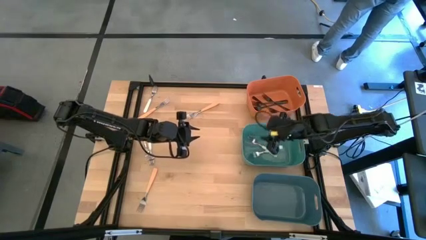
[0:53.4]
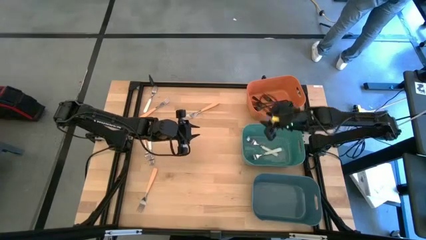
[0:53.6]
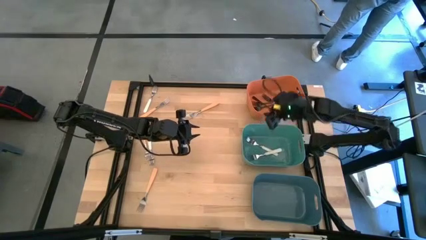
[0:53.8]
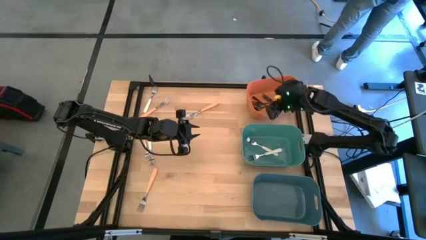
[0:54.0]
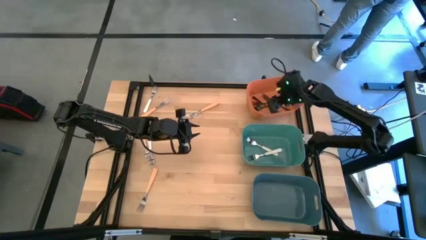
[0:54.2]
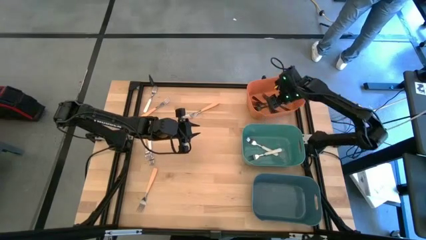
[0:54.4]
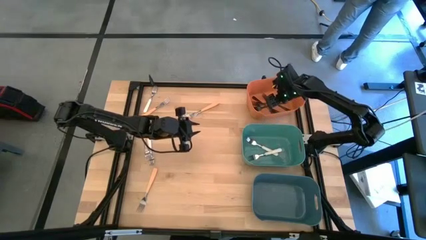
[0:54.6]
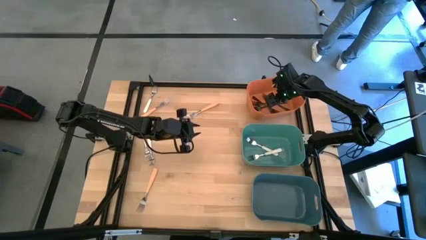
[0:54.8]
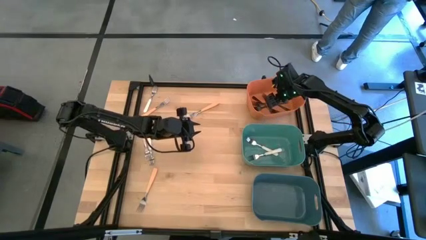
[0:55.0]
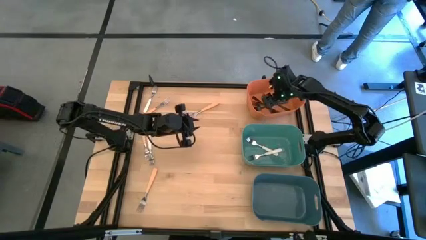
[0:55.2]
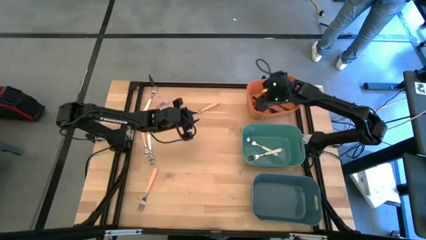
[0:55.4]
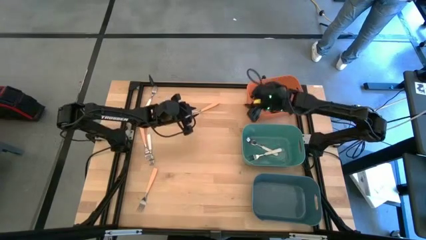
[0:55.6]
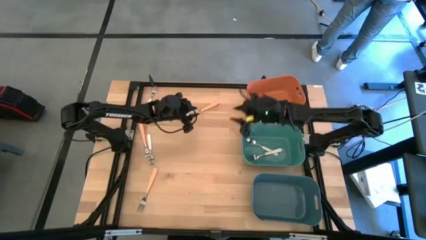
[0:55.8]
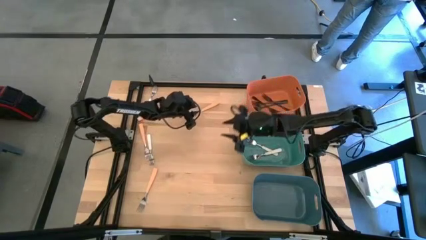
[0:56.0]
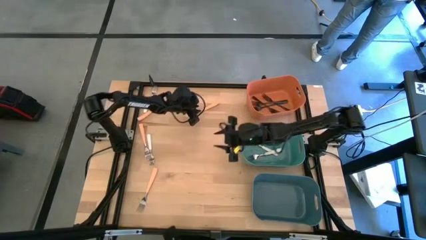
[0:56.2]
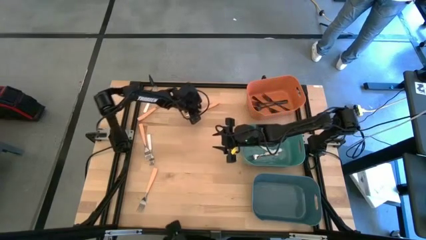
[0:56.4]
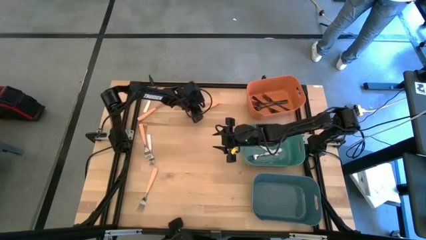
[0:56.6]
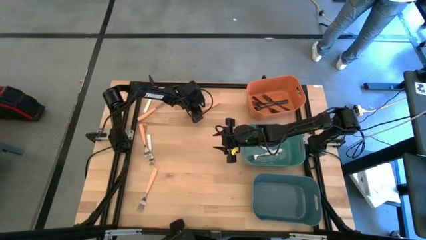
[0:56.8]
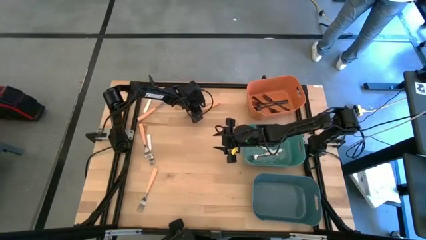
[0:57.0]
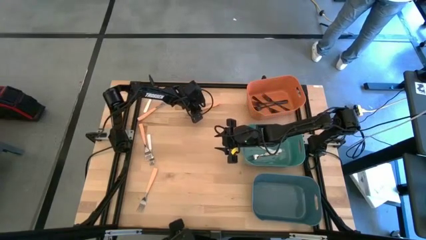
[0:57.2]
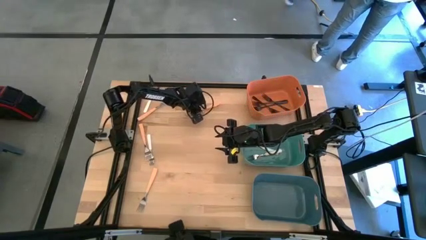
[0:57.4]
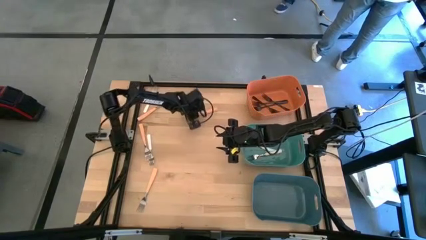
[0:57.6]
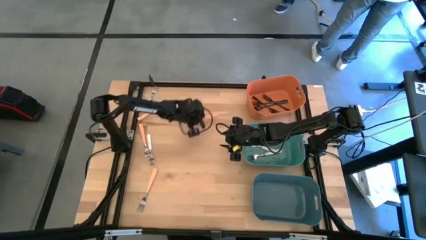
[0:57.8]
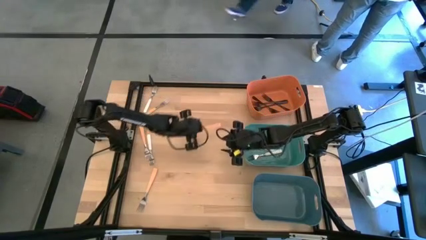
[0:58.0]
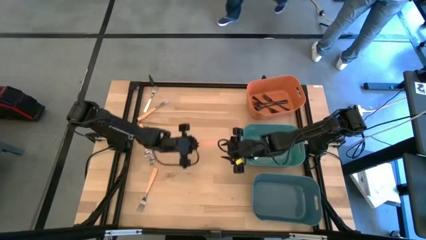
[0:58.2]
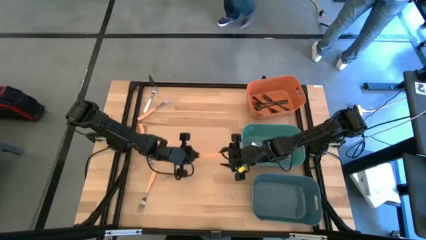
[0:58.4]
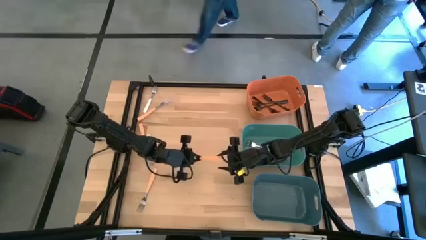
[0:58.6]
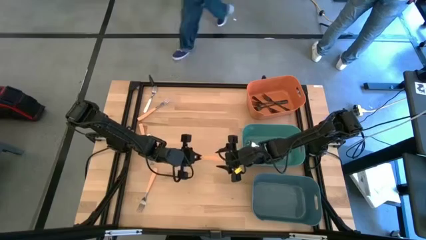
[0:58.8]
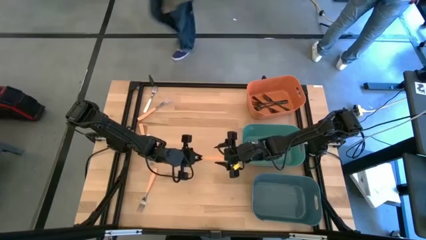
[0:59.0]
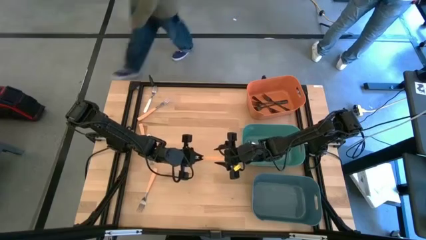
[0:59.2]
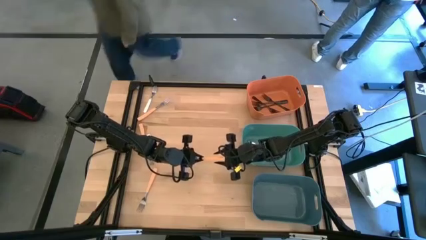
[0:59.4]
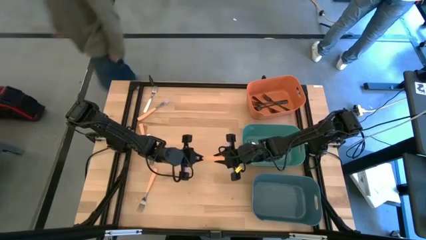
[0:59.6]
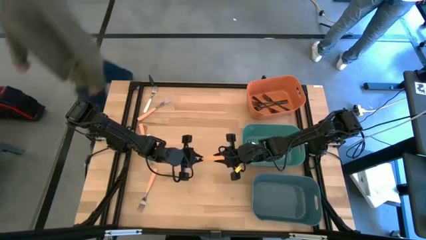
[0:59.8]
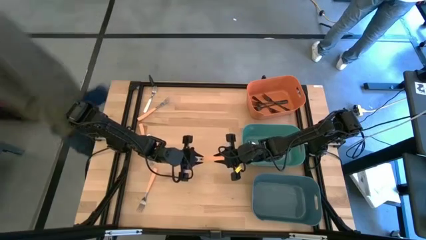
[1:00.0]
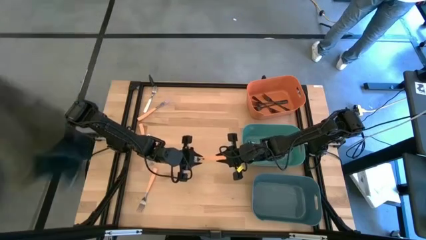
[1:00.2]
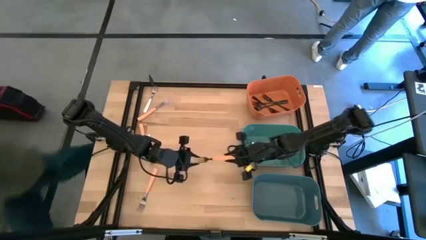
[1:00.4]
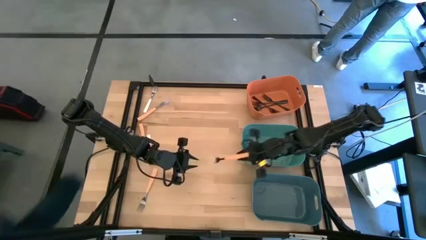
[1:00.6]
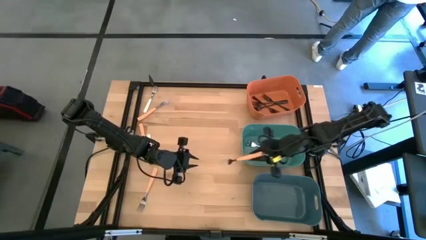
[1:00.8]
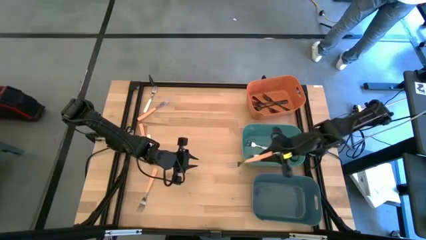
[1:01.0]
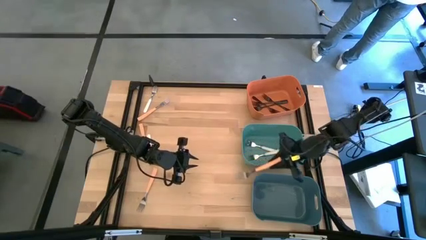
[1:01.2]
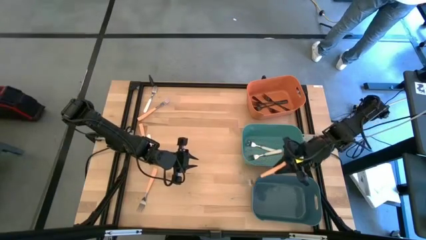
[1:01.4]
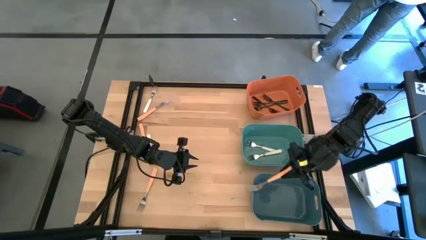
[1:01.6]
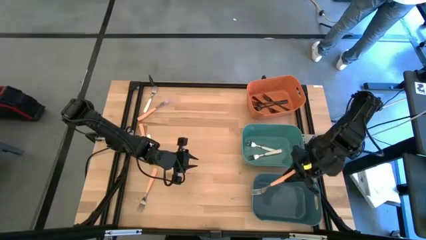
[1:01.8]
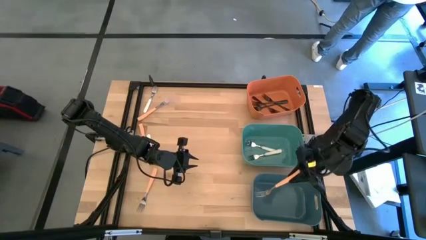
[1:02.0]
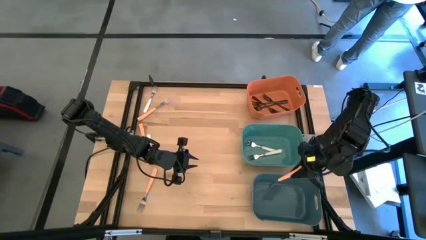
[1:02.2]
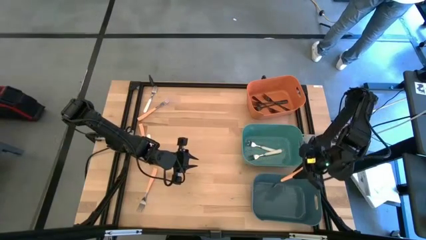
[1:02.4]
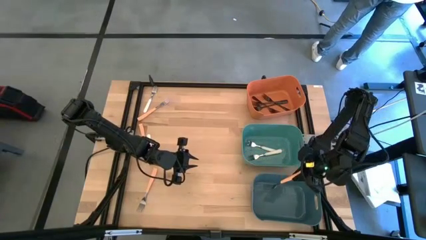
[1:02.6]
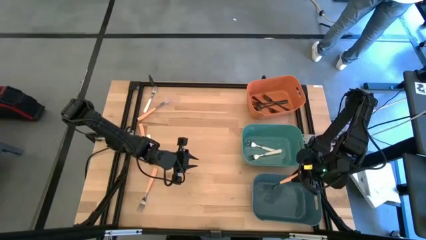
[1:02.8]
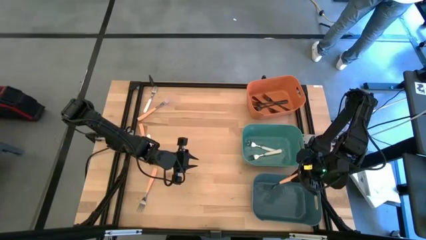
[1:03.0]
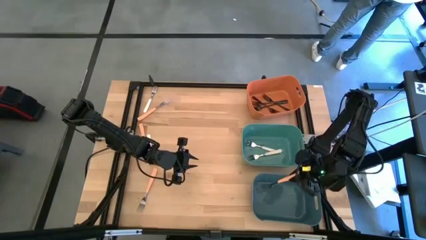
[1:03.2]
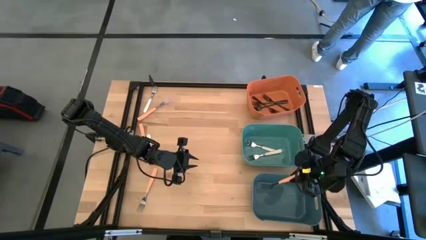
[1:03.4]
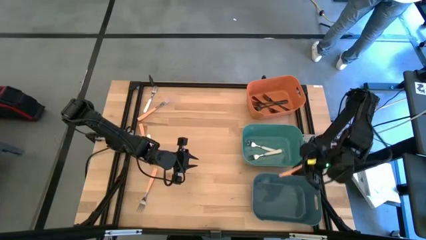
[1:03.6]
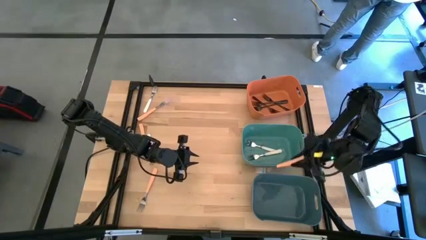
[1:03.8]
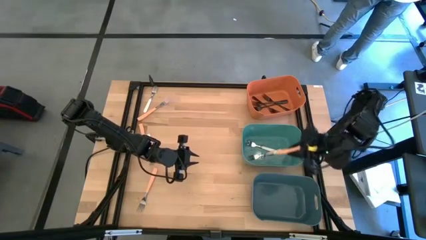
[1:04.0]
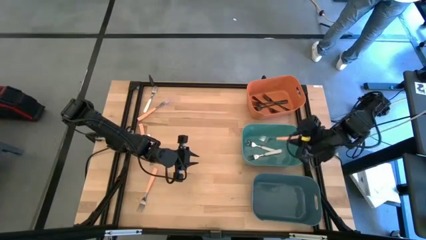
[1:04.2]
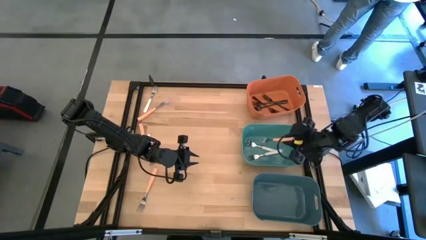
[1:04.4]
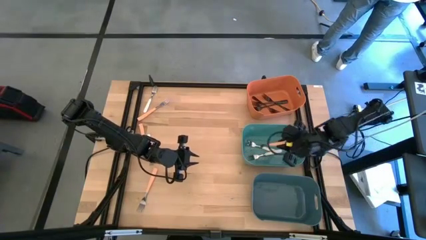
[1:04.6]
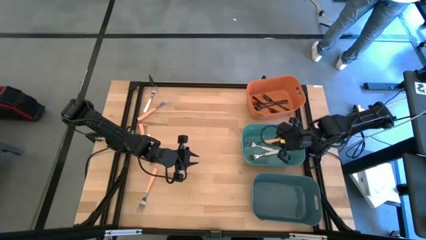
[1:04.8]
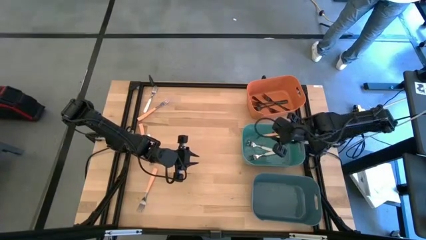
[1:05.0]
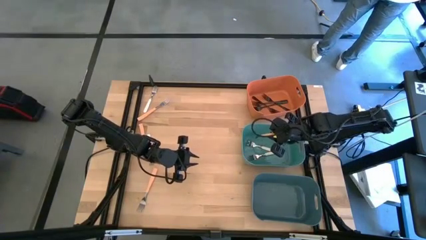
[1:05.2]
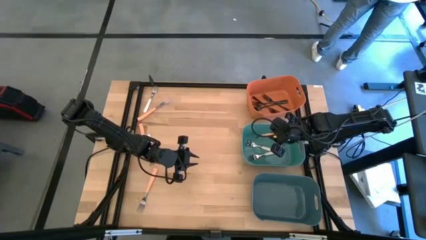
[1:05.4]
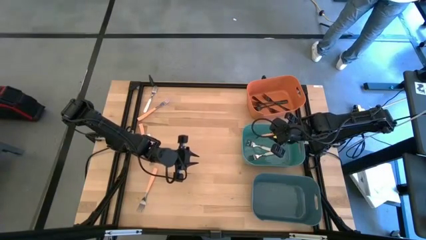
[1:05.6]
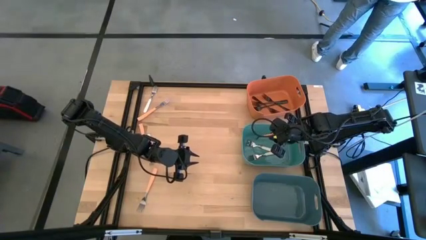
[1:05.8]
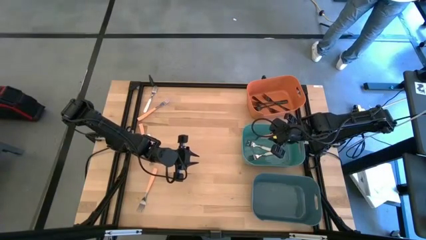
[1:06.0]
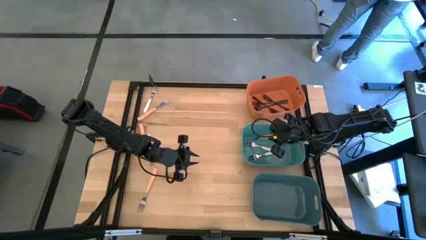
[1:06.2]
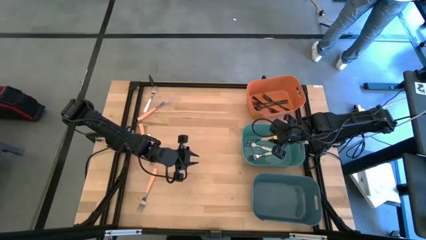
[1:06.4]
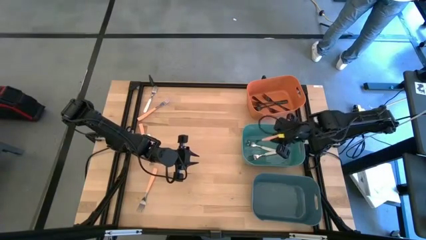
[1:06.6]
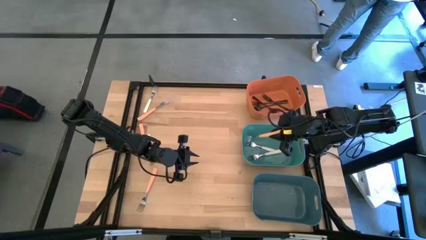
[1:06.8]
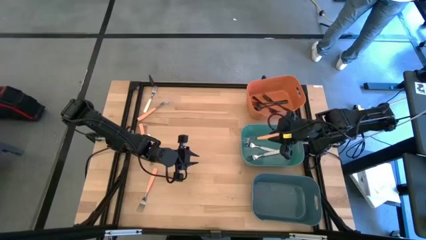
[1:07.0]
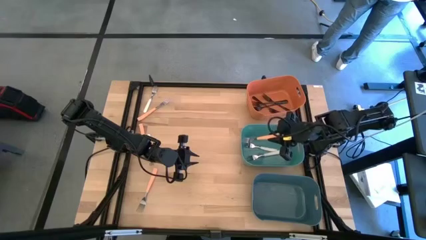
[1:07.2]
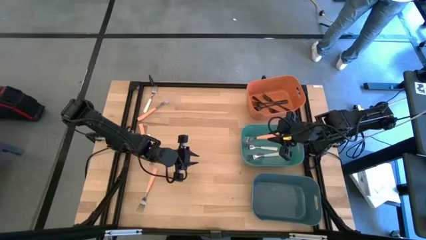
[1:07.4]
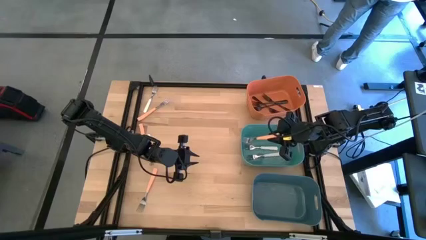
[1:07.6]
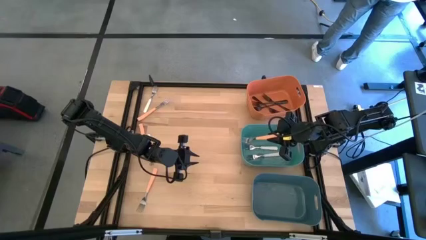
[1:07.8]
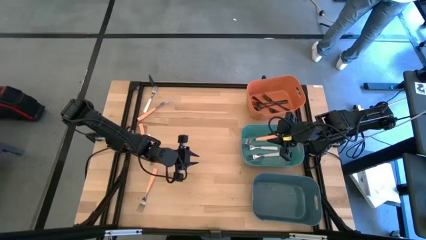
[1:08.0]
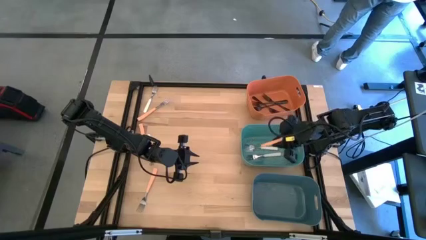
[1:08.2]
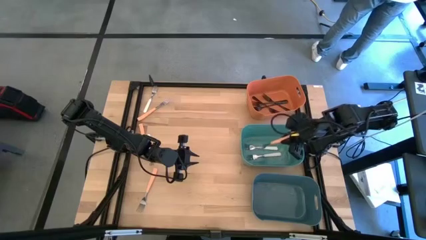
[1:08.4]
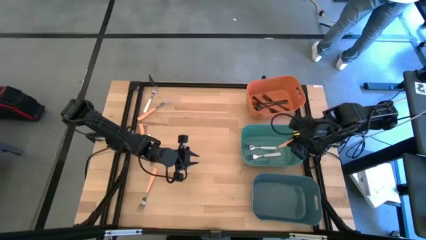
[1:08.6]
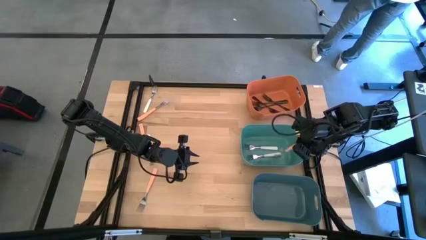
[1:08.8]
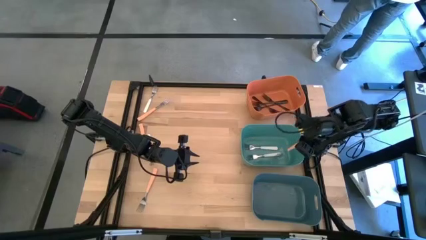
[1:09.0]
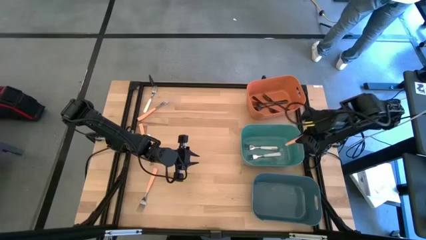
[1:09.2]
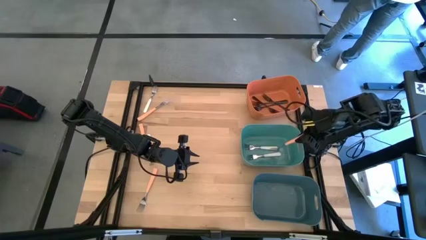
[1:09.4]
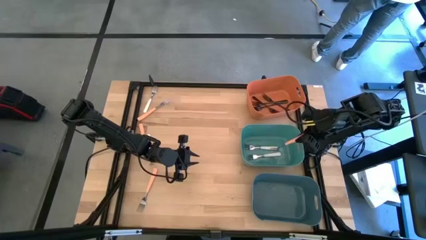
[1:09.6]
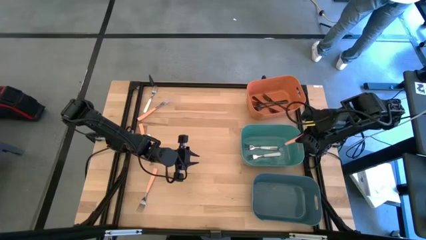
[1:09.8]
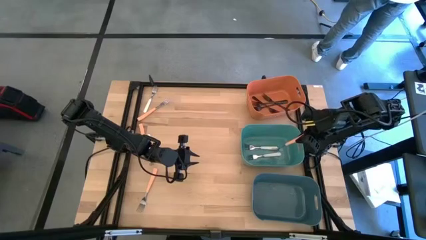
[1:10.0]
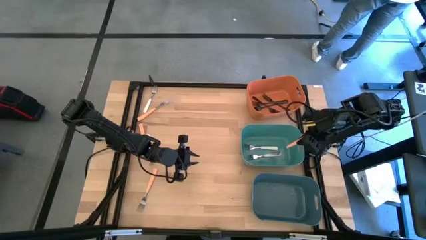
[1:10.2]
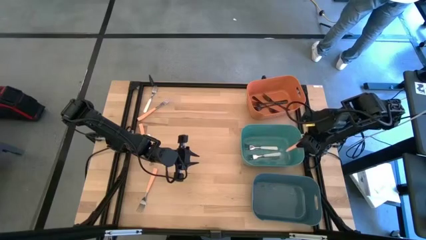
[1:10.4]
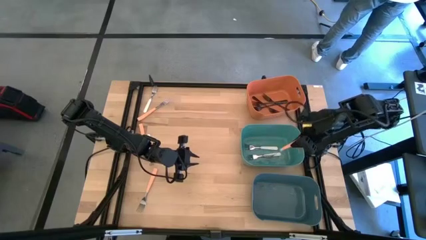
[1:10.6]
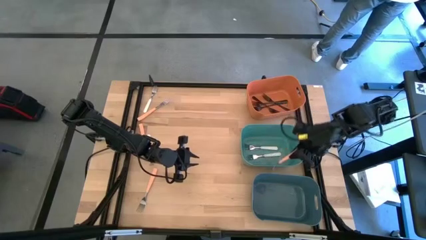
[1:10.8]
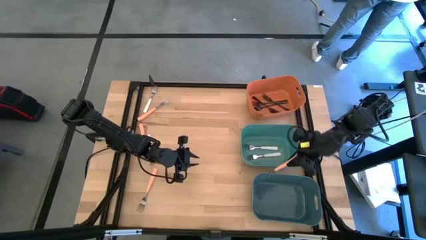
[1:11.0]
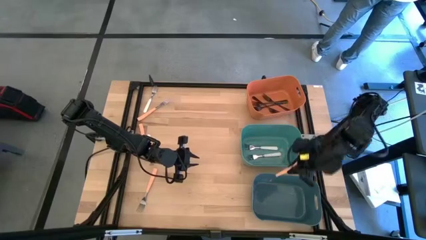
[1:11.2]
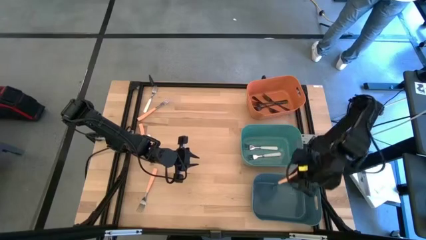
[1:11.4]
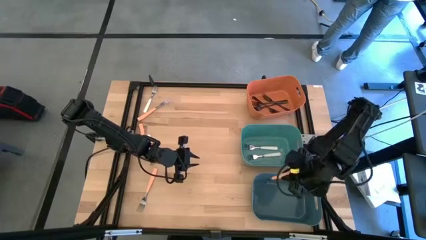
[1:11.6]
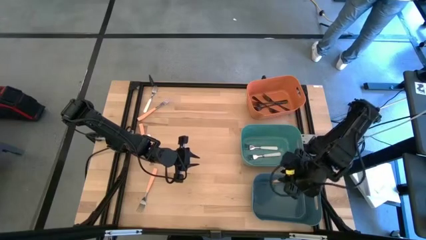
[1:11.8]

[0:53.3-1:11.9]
Task: Sort silverware by color (type)
Put the orange fork into the dark blue bin
